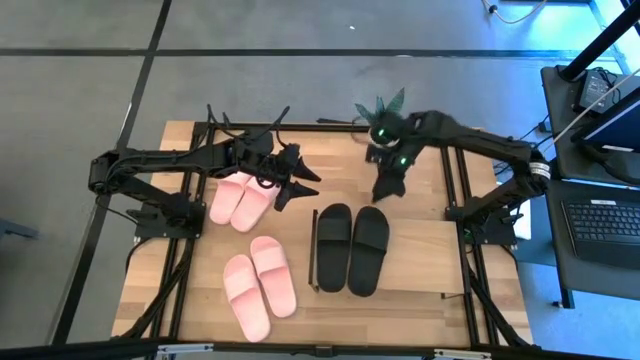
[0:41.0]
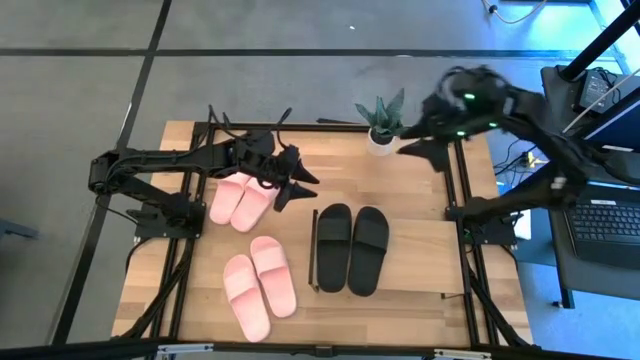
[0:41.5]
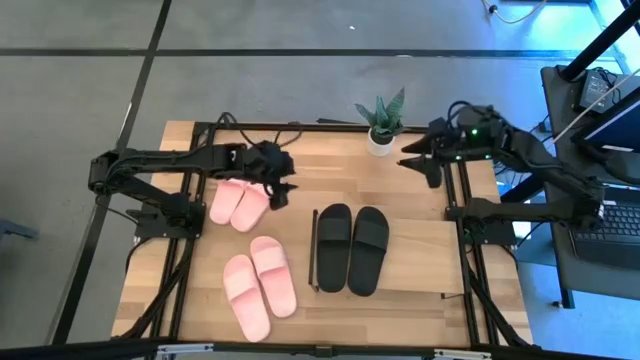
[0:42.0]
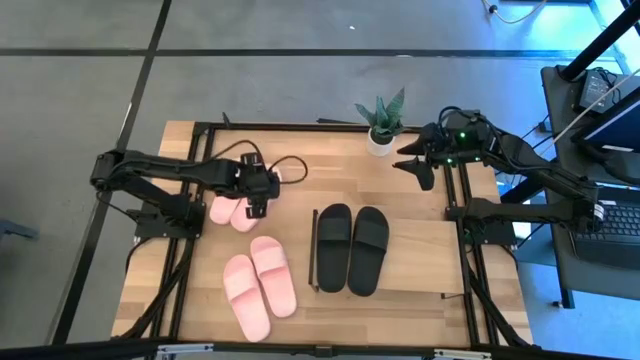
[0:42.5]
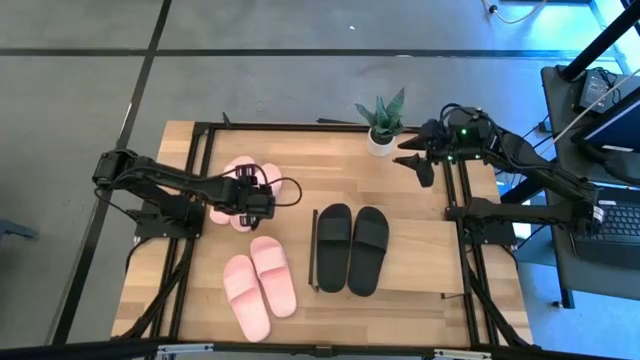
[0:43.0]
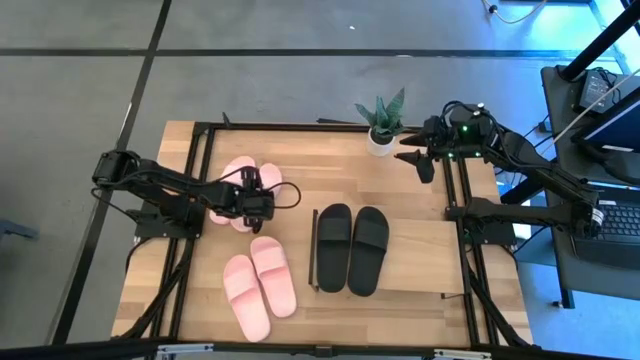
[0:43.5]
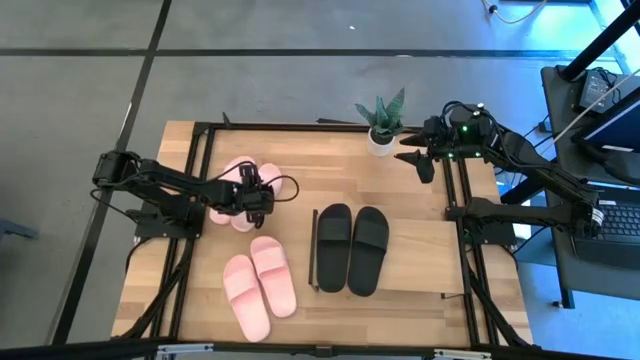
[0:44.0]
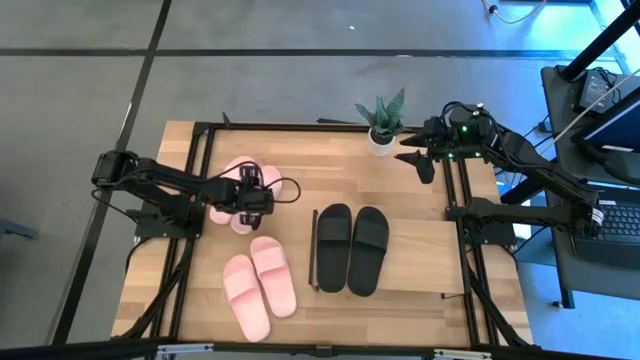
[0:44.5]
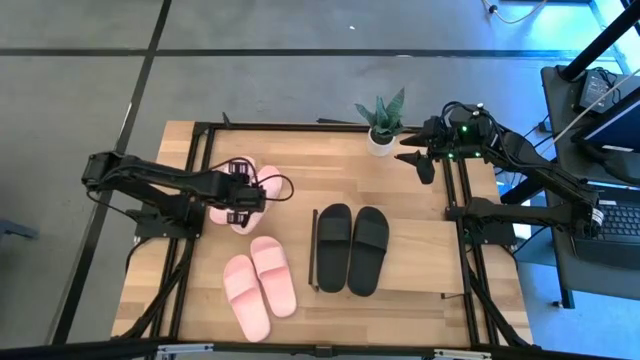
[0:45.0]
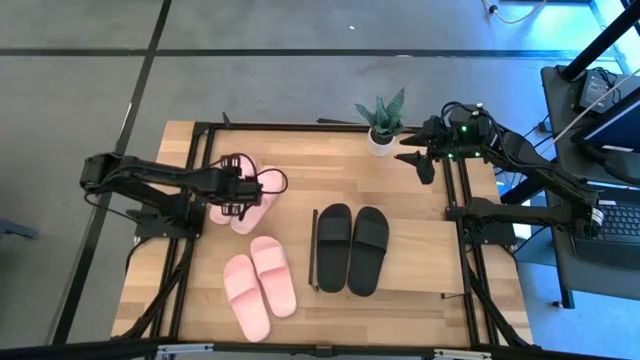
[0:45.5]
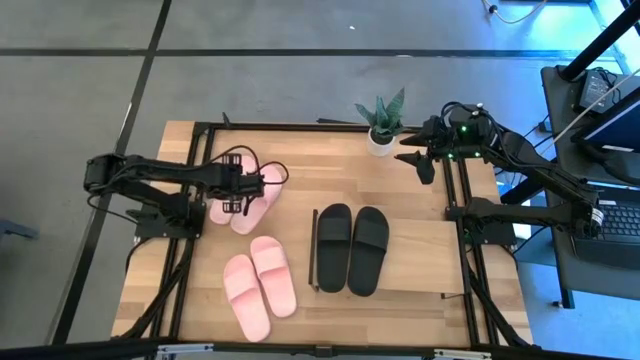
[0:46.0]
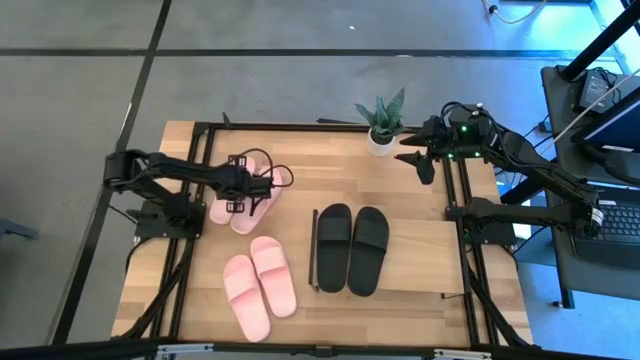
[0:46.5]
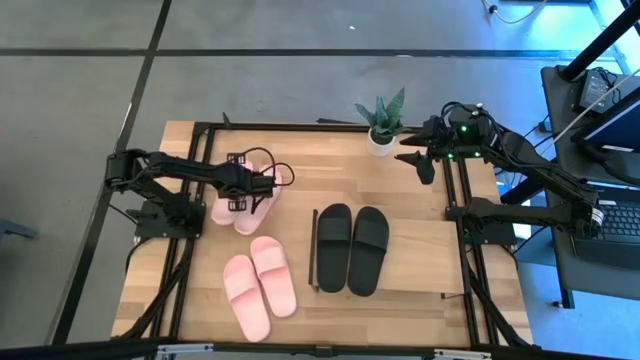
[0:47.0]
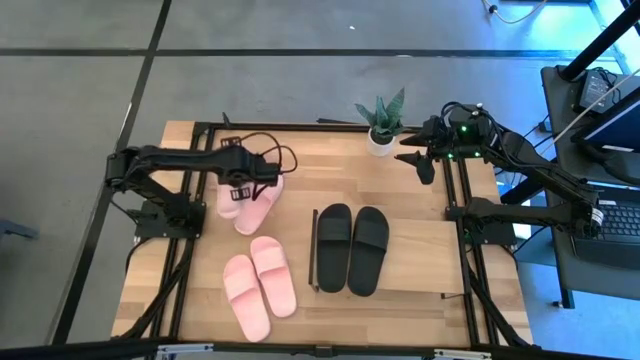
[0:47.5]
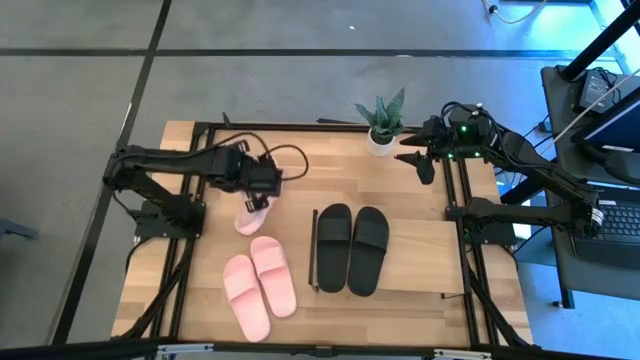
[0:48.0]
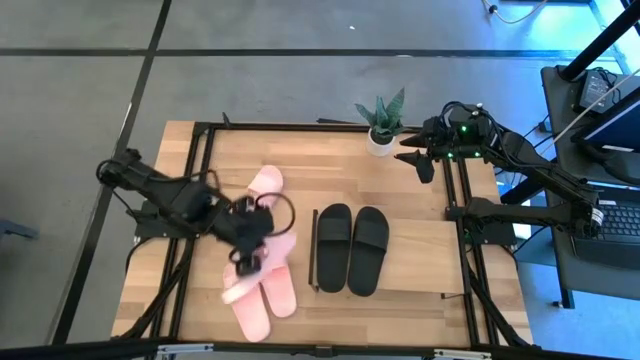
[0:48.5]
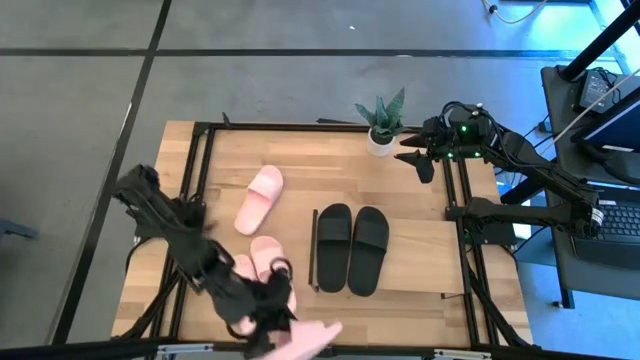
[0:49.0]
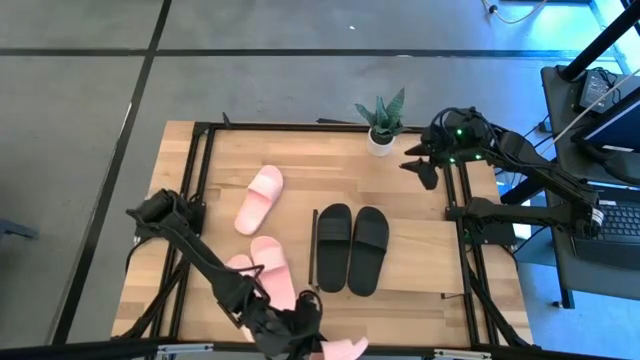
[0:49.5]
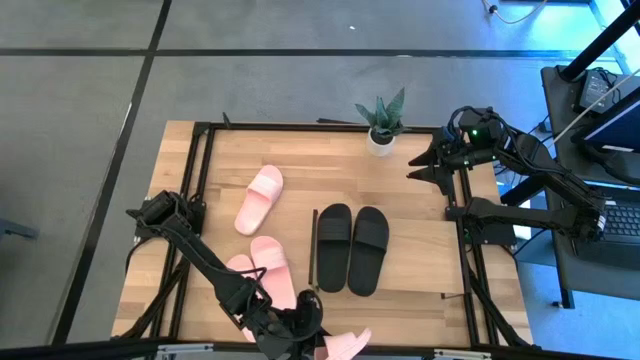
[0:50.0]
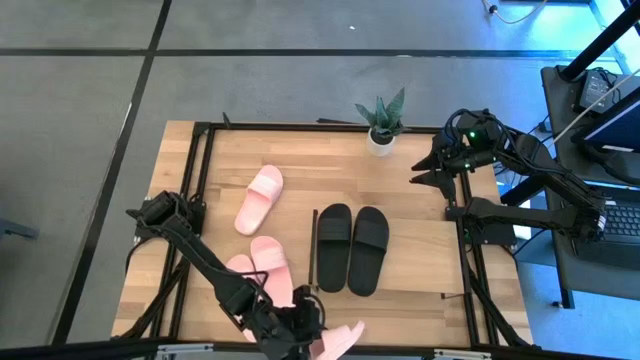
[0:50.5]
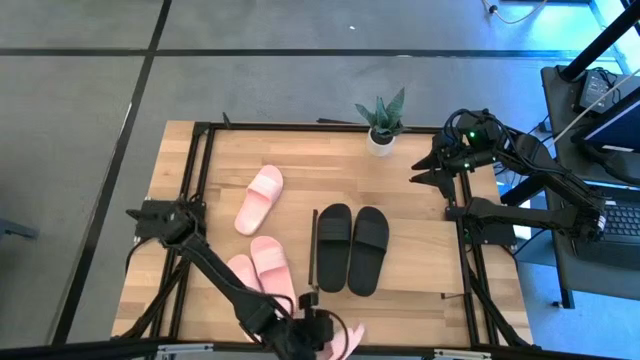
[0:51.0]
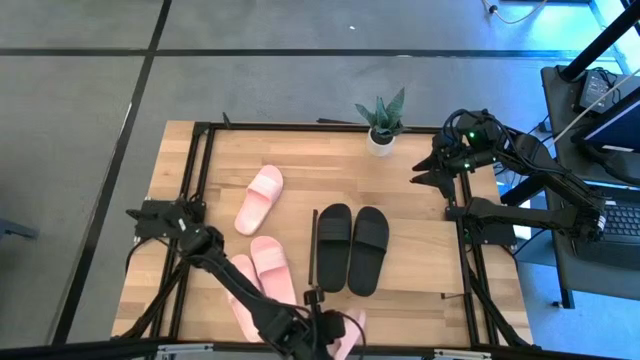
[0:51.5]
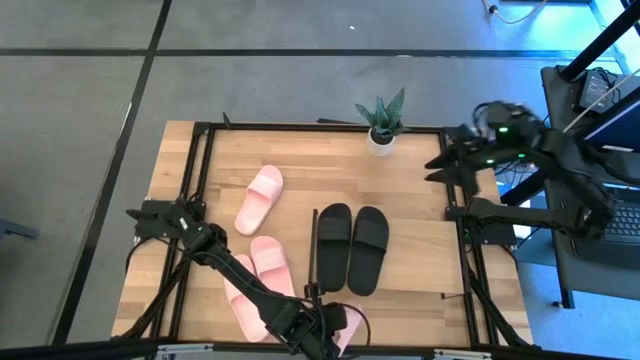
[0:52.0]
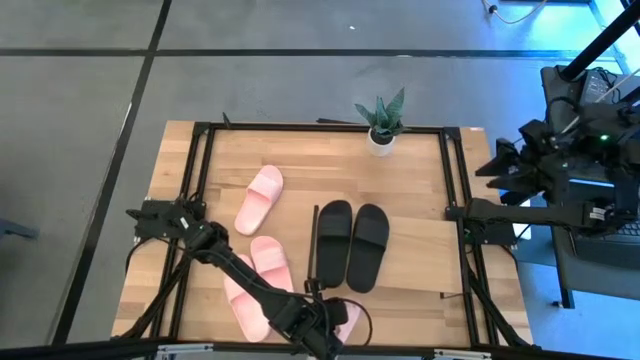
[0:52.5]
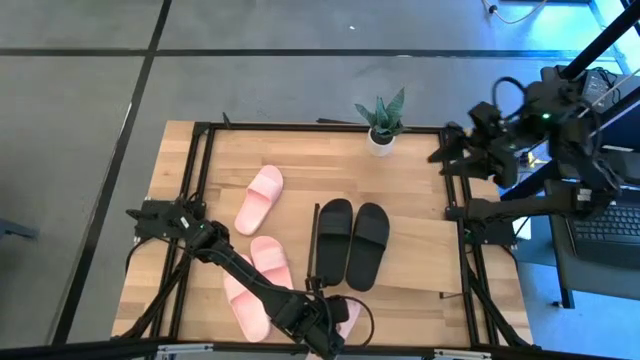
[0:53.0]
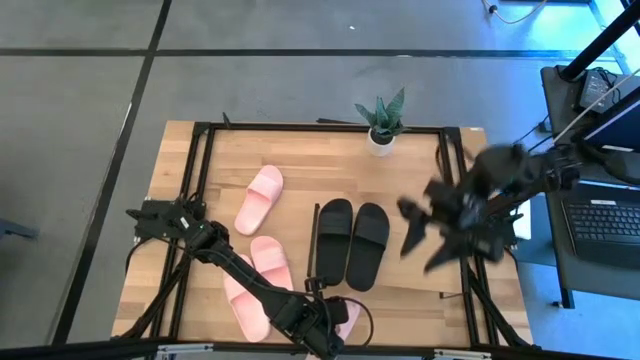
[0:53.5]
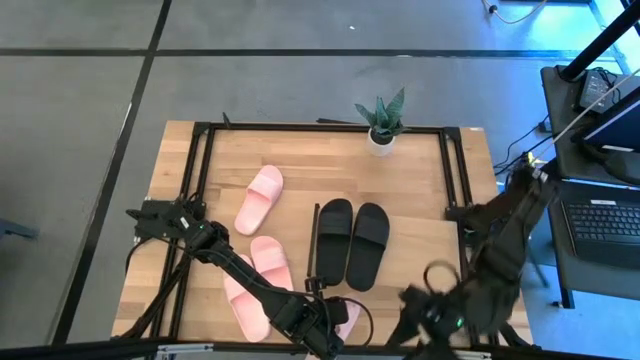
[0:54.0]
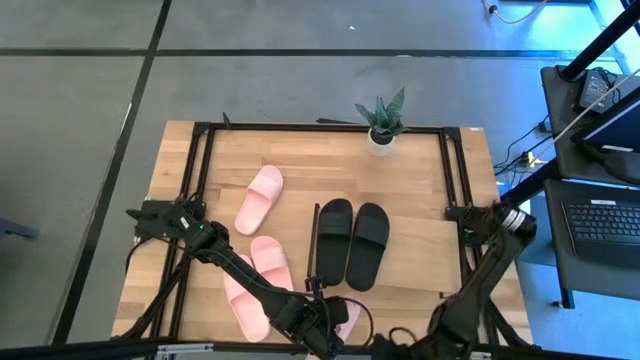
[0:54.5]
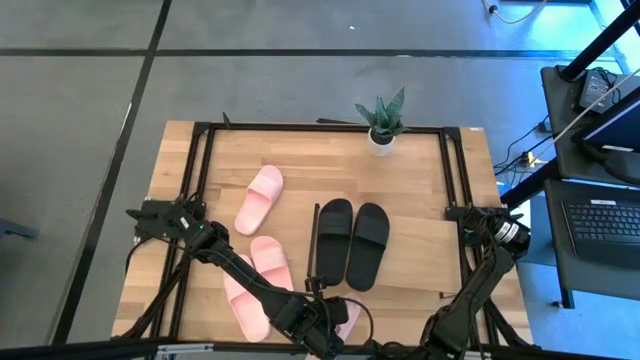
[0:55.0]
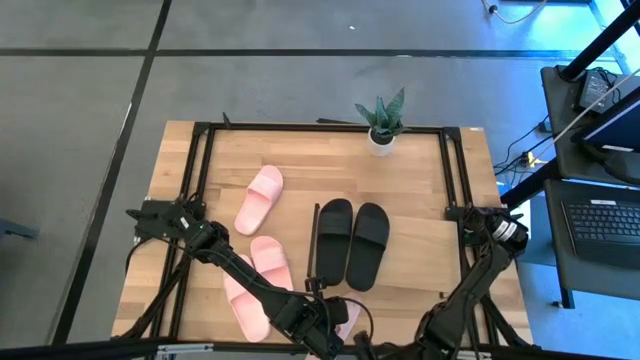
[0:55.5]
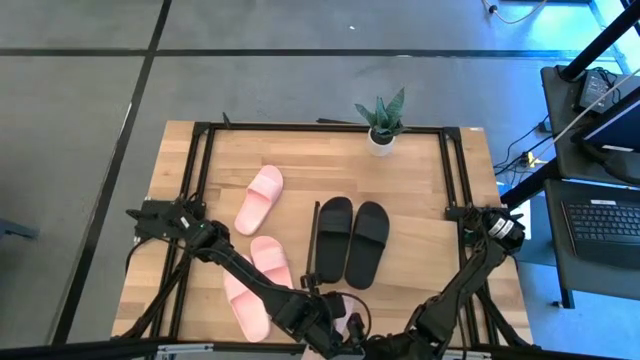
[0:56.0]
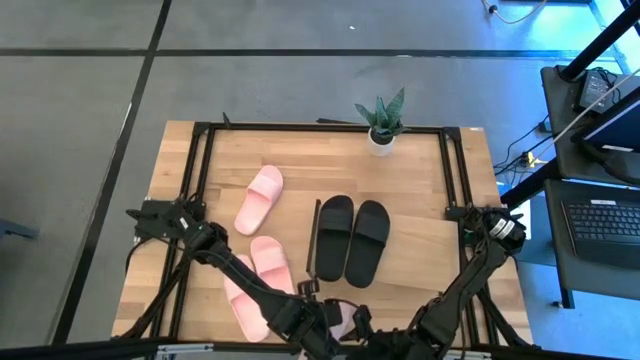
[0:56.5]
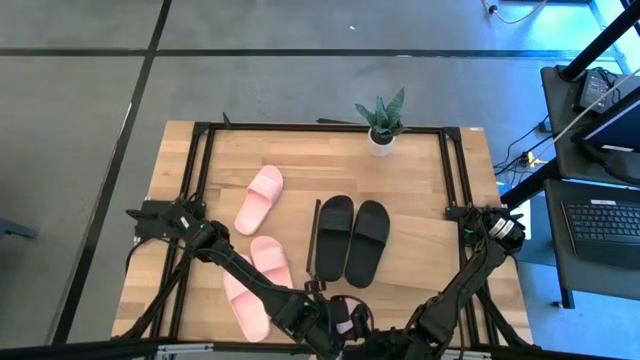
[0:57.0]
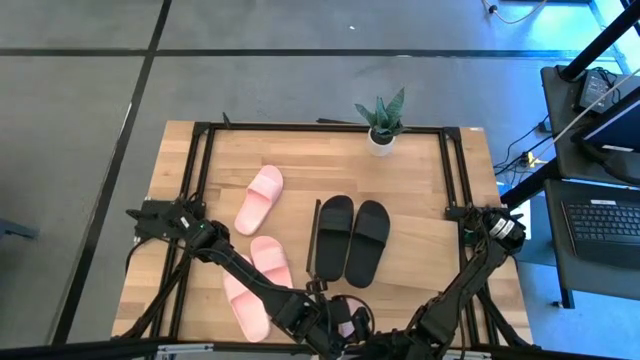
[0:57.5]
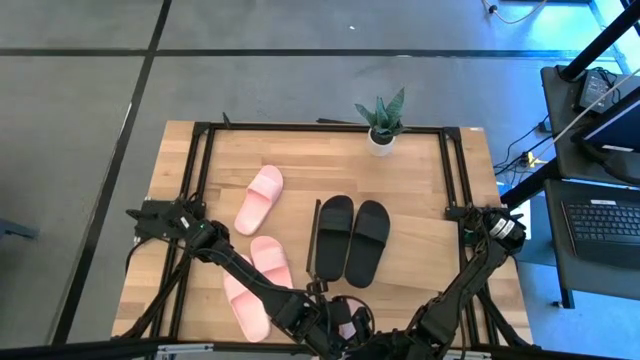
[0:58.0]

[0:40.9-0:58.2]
Task: Pick and place slides into the shelf
Put the top left pink slipper under the shelf

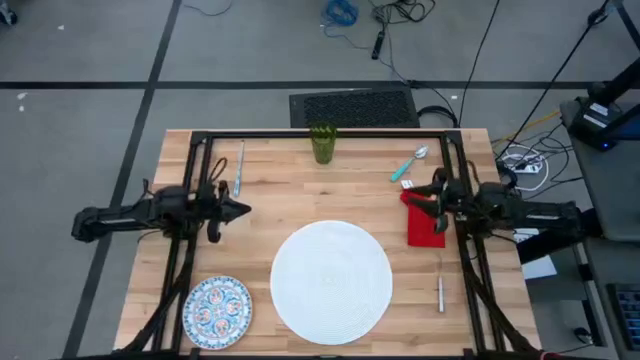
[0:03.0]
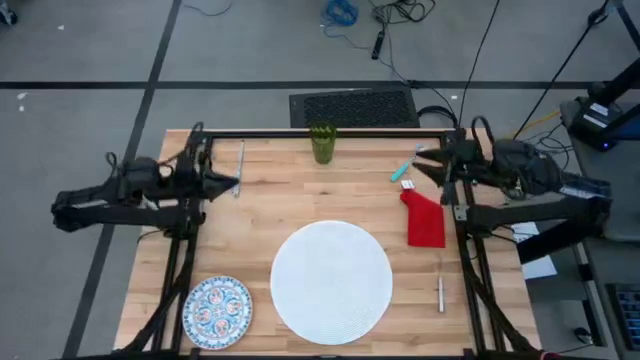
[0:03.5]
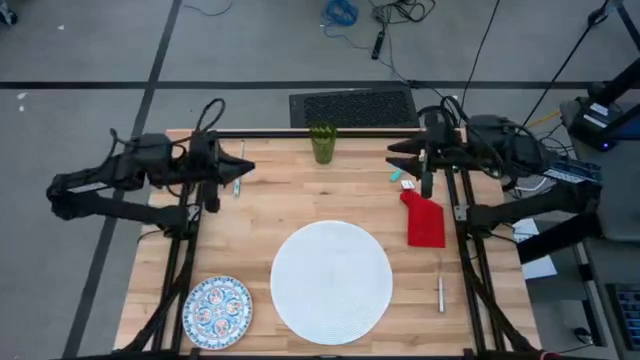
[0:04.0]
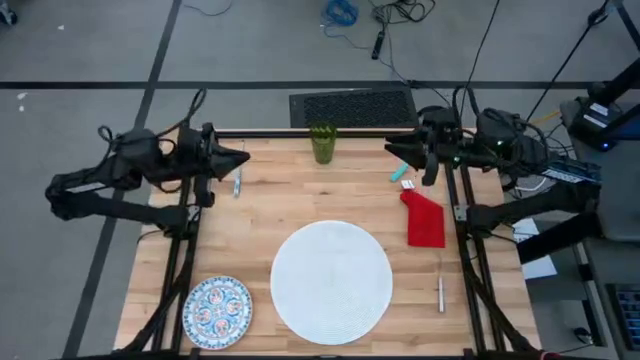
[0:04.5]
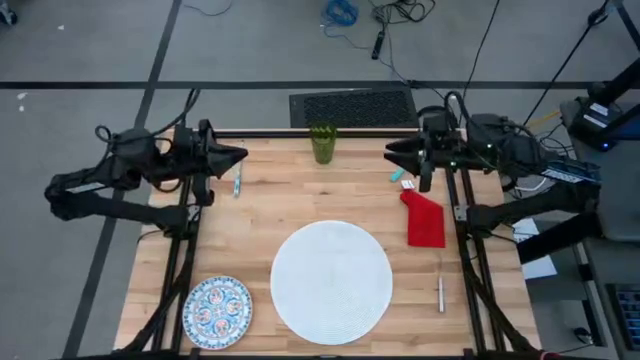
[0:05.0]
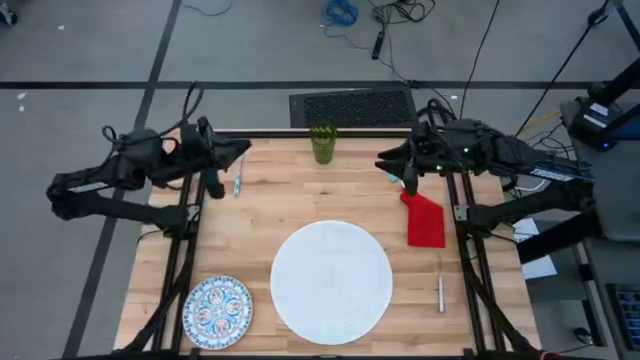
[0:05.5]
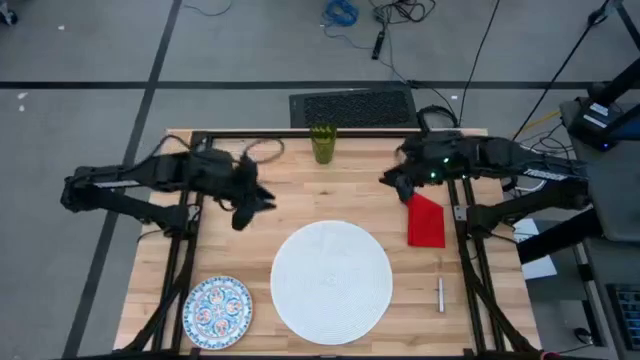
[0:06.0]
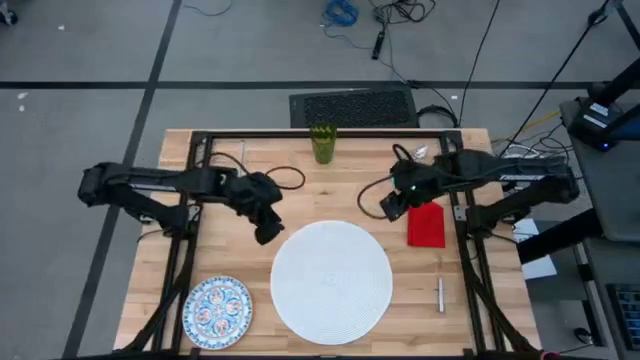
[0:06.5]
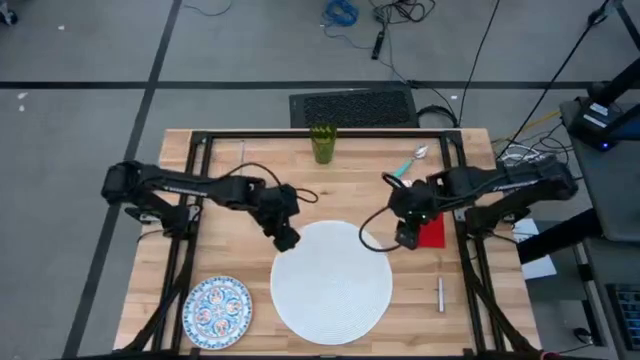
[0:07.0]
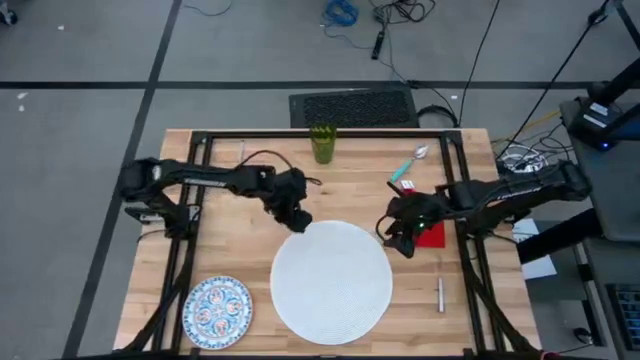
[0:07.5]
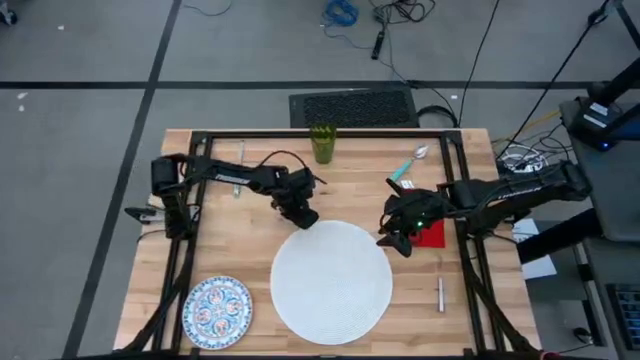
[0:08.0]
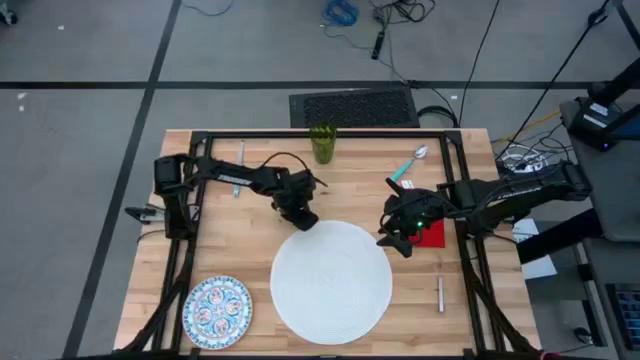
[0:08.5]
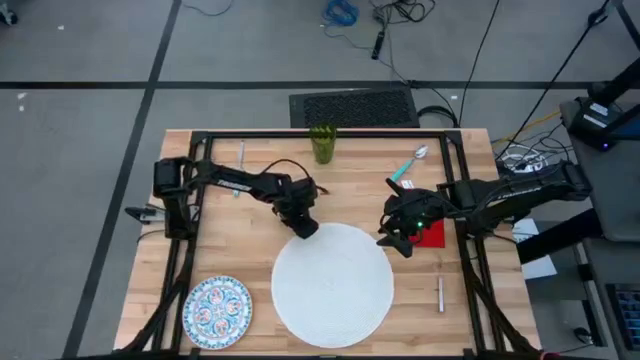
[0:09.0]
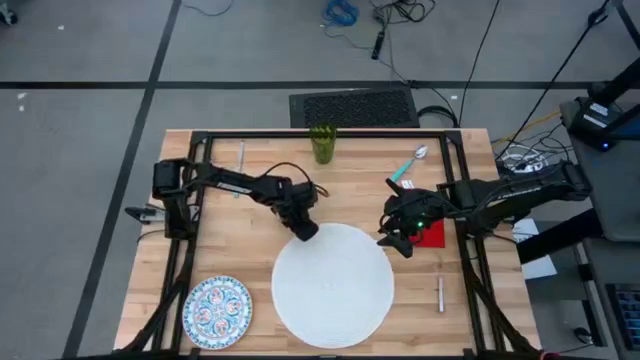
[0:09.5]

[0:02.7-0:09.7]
Task: Set table place
Move the white placemat to the center of the table
